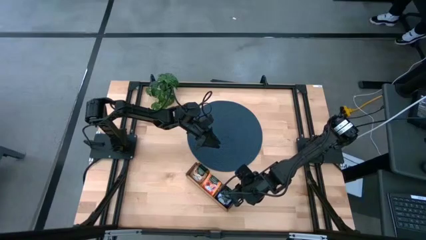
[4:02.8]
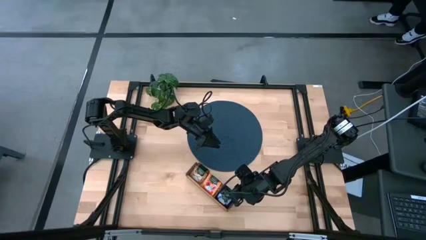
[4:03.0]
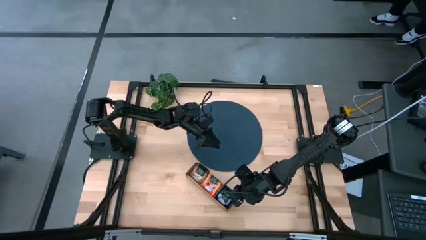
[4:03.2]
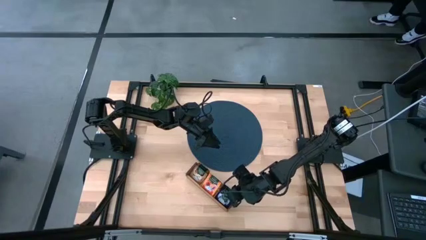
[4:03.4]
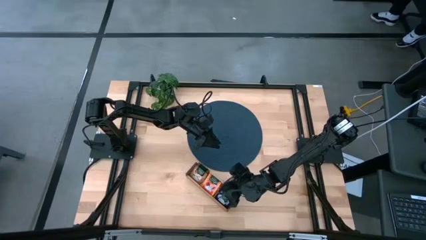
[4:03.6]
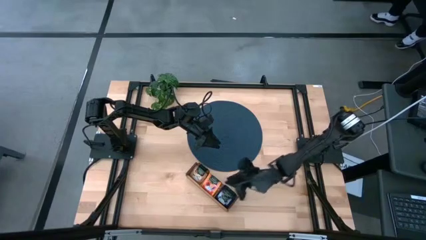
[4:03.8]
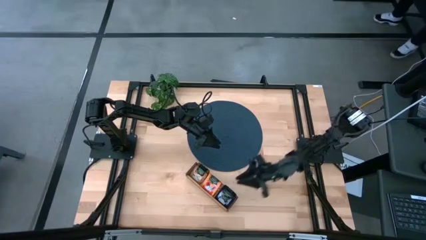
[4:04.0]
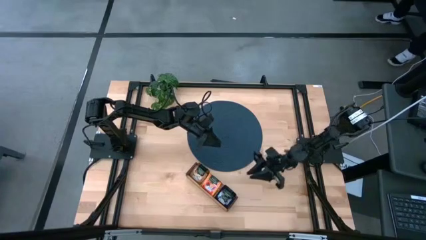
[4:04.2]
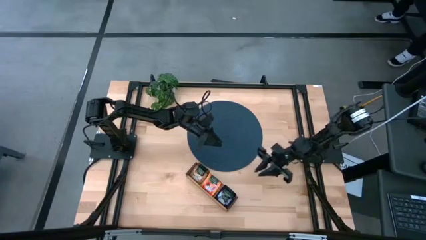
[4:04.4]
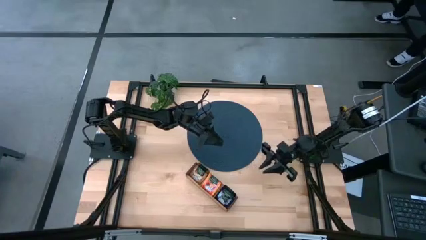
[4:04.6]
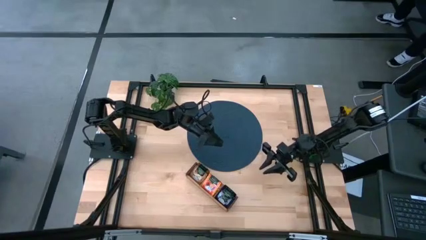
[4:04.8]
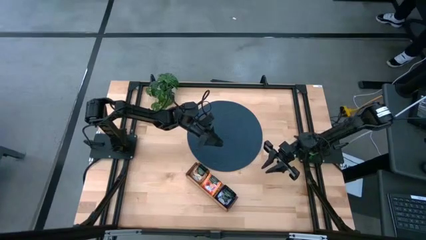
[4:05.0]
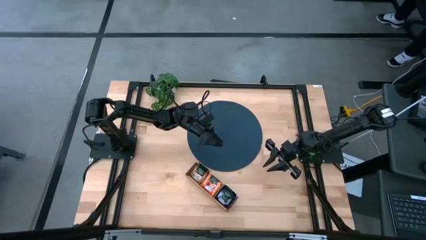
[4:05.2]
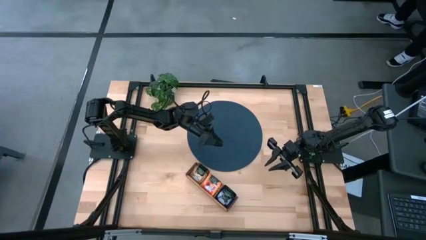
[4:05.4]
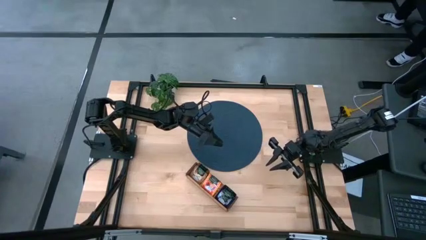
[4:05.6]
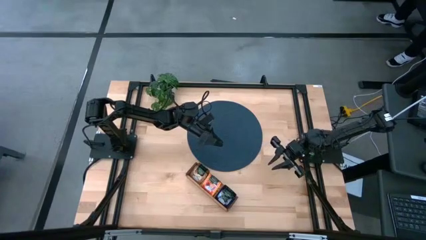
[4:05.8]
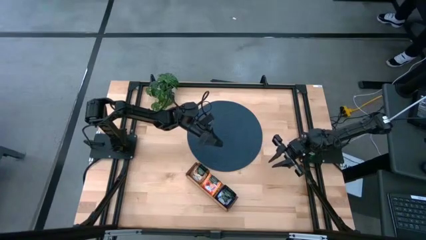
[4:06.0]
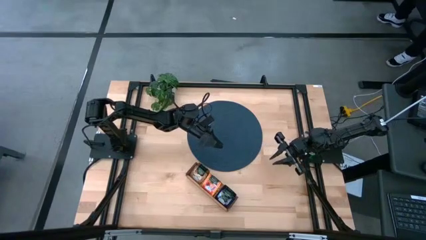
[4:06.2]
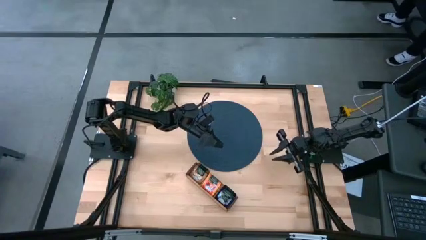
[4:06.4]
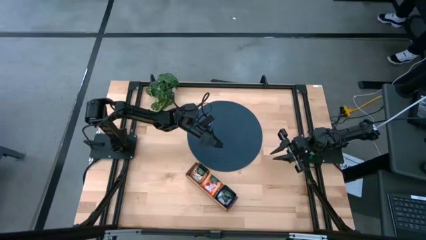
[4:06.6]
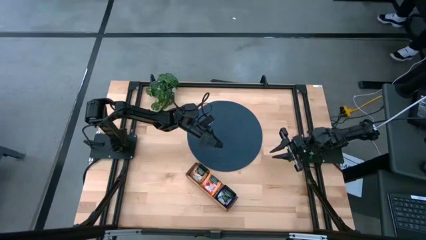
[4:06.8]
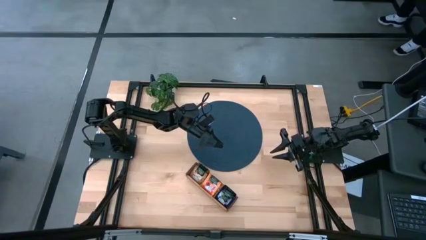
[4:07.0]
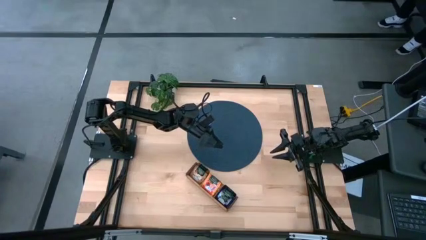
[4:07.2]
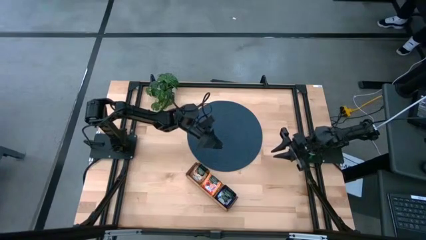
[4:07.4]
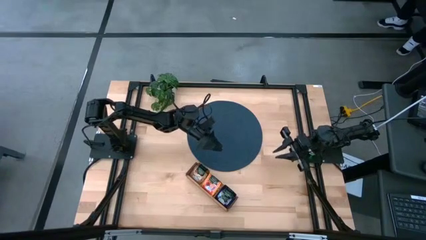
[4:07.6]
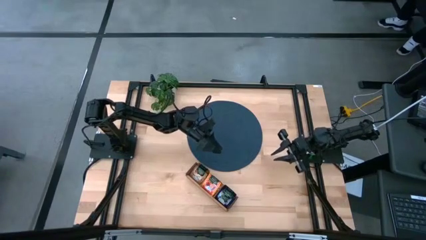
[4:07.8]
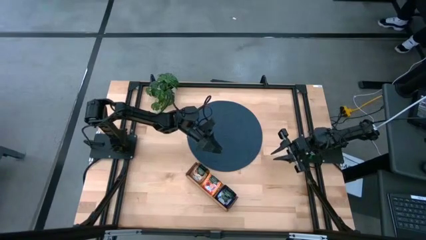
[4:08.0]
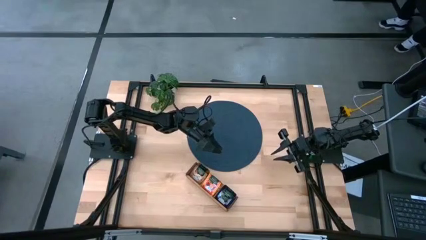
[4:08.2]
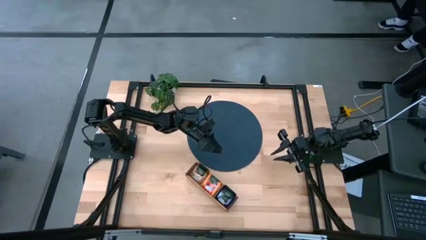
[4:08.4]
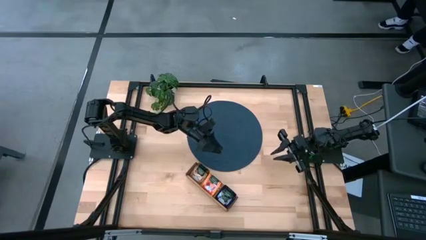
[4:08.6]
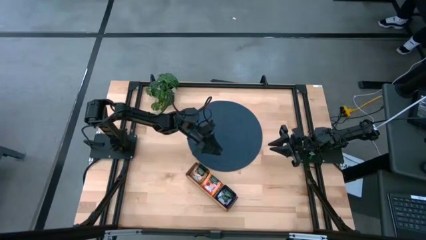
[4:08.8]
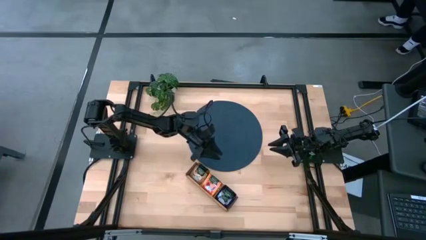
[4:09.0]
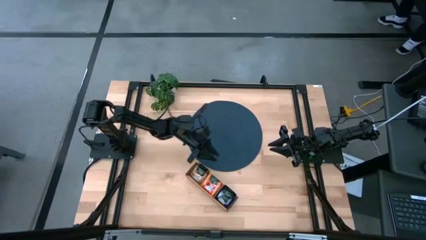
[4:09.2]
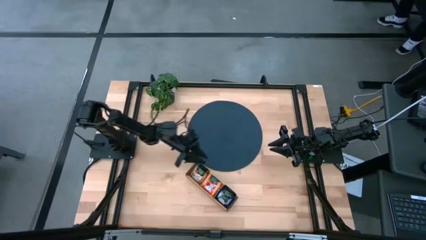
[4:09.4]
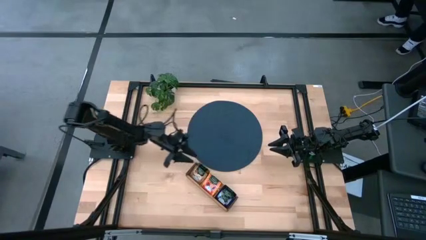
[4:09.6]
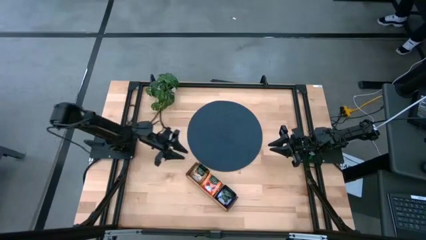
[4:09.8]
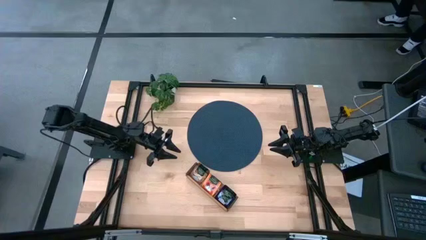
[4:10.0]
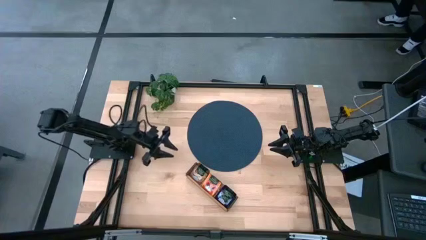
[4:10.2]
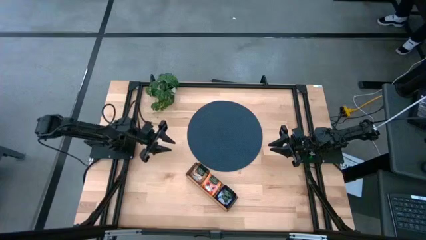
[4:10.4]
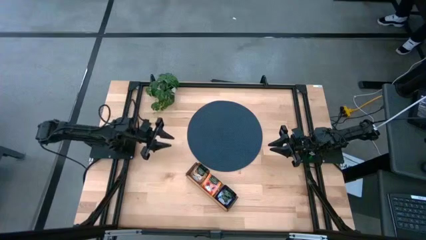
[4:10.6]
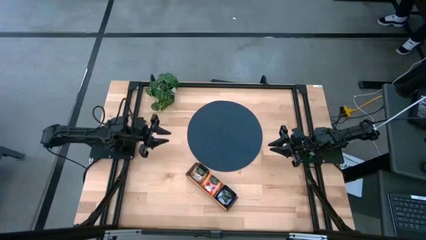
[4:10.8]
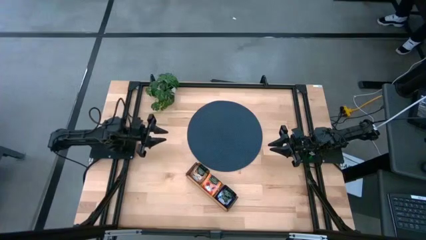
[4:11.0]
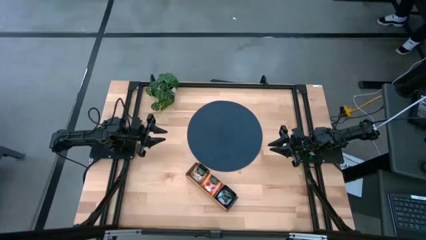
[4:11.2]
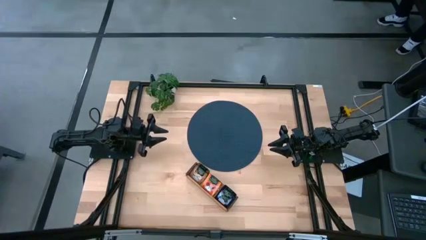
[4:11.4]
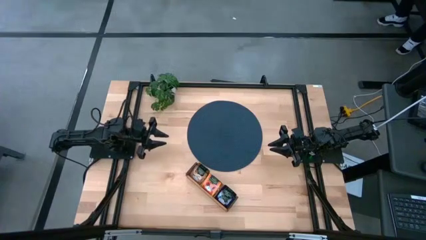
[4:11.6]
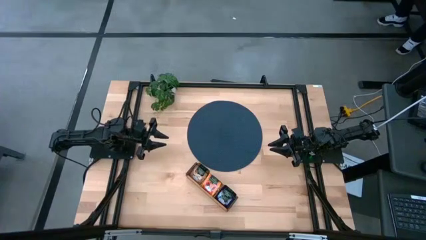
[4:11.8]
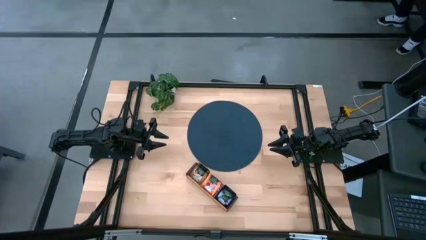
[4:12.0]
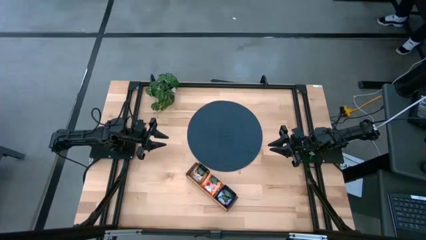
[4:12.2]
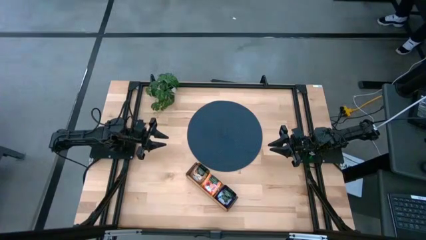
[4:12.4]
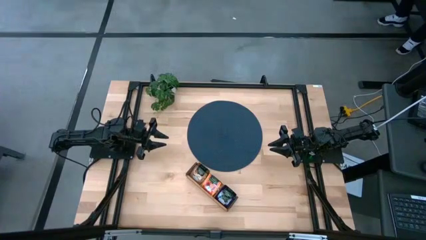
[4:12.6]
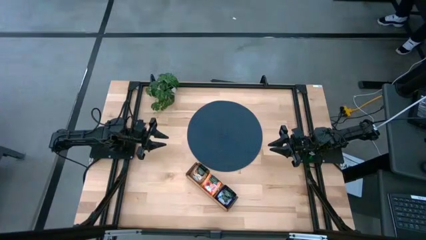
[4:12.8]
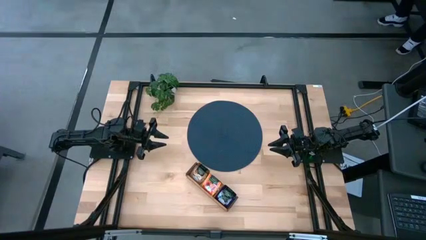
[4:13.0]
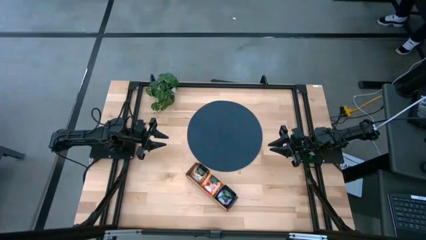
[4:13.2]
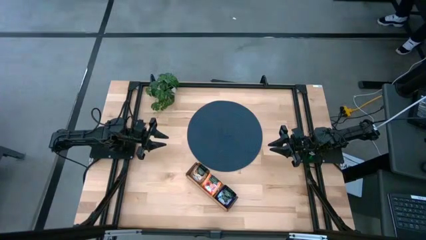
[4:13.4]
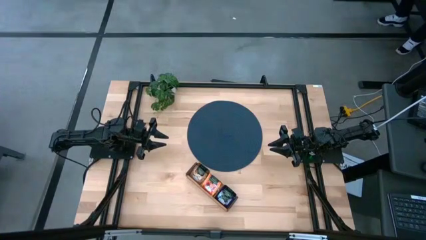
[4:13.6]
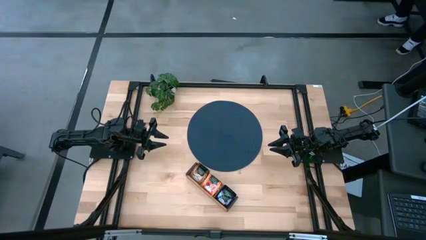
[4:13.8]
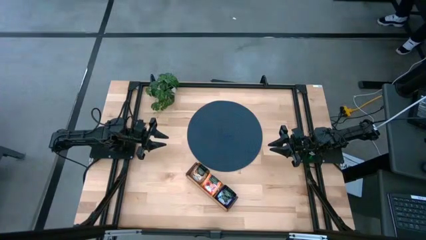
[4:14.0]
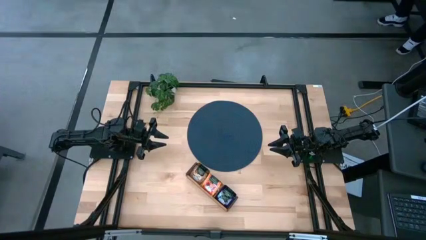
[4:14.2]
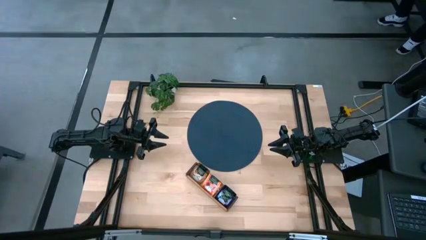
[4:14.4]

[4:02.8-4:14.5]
Task: Pick & Place Tea
Return to Home Position

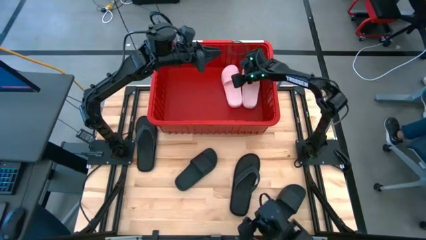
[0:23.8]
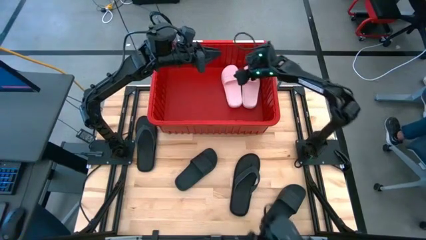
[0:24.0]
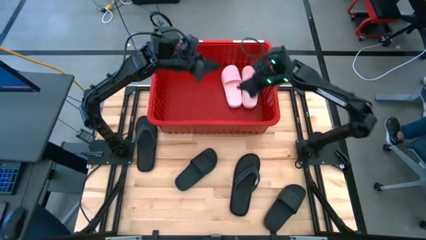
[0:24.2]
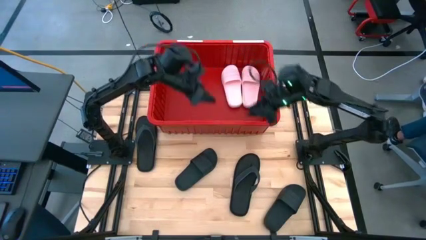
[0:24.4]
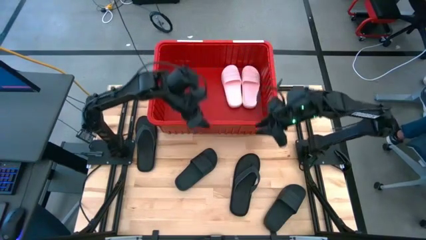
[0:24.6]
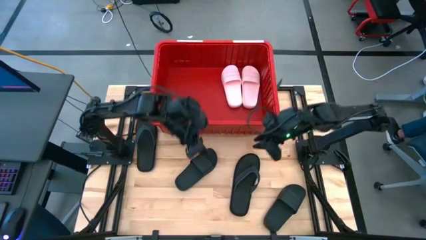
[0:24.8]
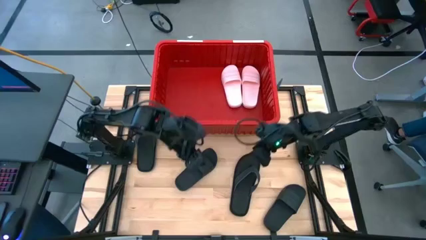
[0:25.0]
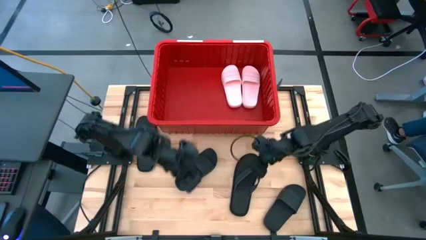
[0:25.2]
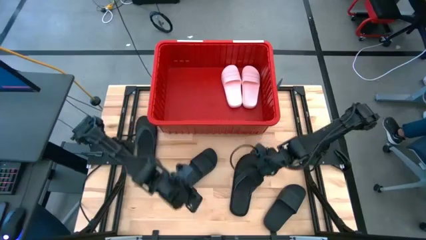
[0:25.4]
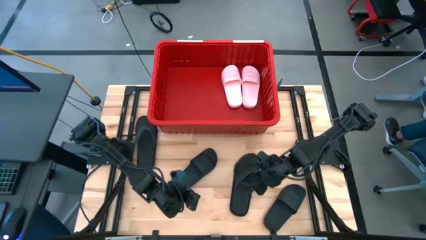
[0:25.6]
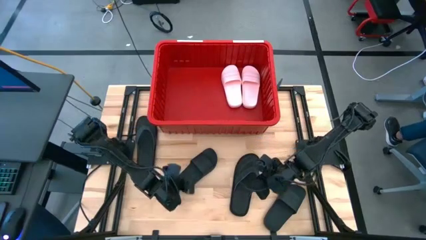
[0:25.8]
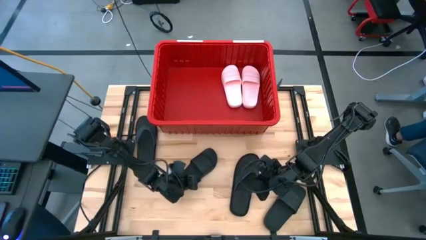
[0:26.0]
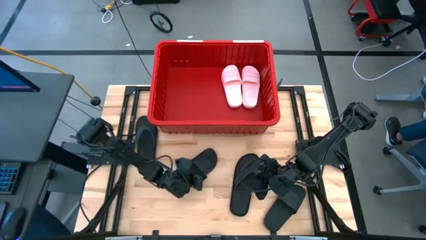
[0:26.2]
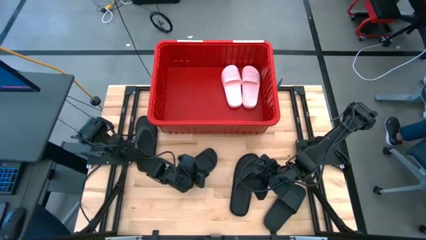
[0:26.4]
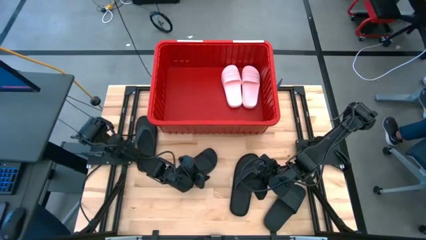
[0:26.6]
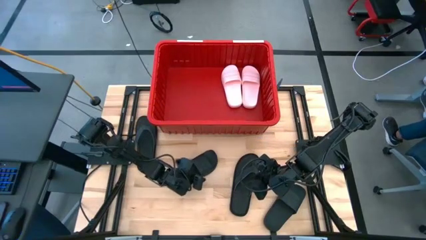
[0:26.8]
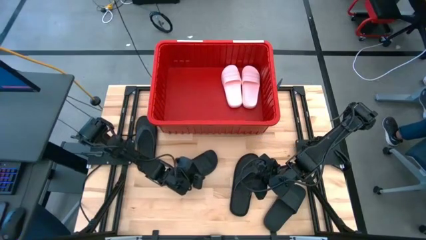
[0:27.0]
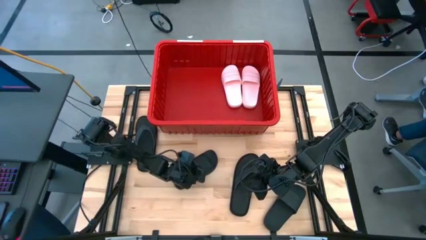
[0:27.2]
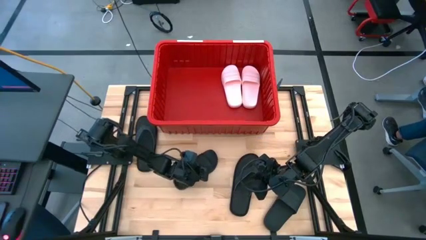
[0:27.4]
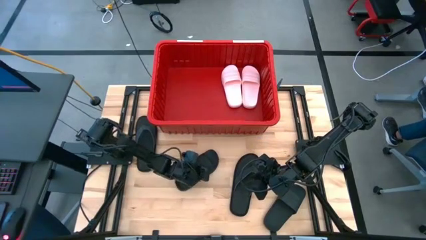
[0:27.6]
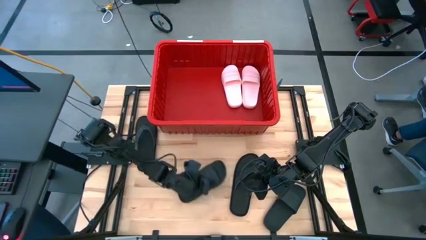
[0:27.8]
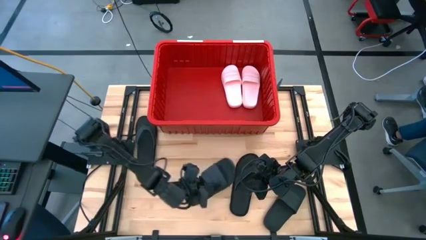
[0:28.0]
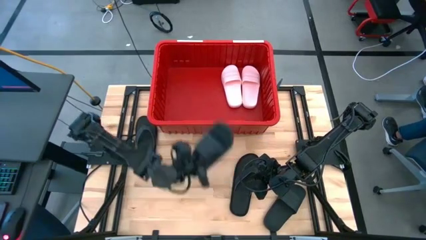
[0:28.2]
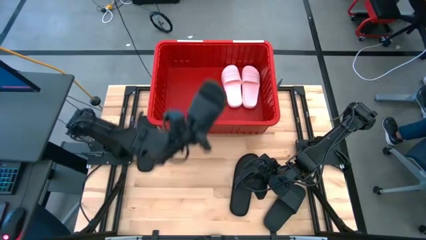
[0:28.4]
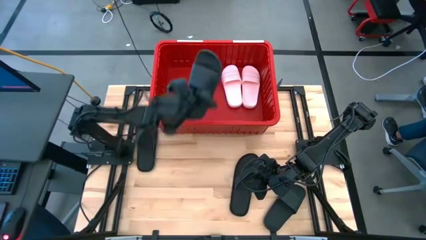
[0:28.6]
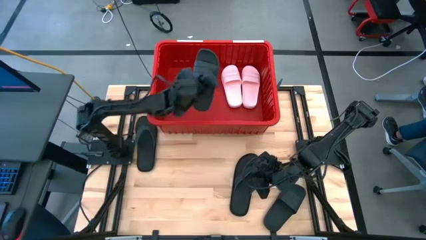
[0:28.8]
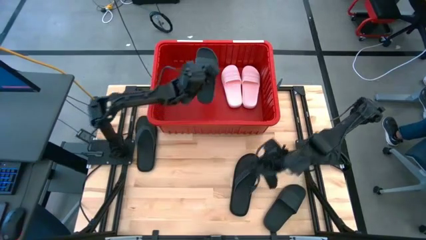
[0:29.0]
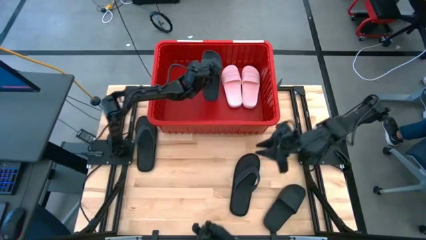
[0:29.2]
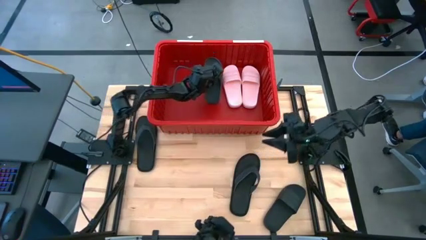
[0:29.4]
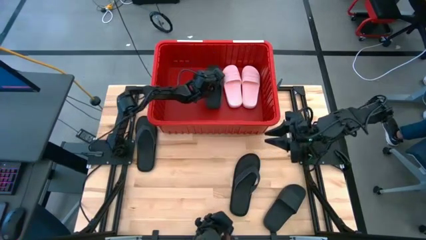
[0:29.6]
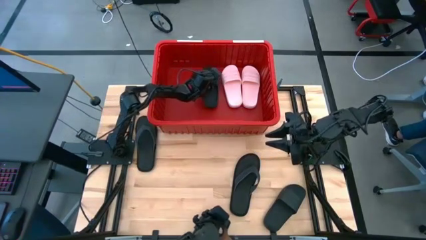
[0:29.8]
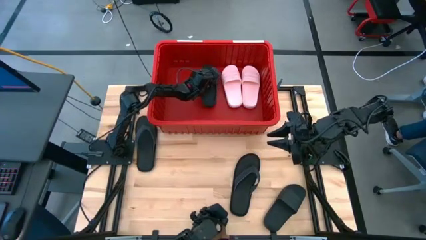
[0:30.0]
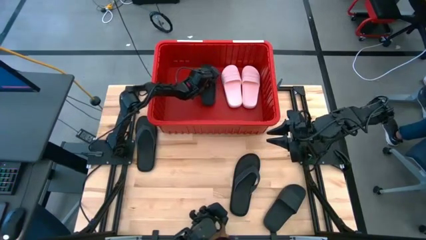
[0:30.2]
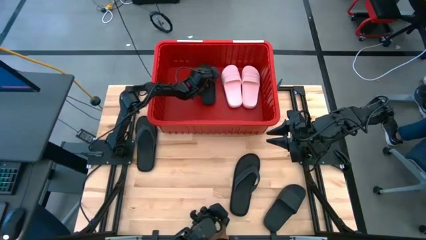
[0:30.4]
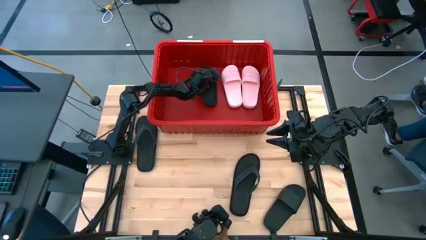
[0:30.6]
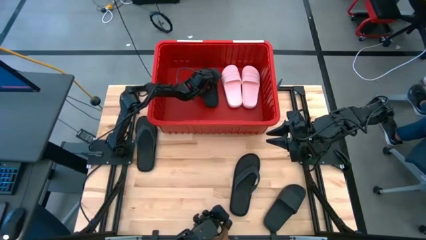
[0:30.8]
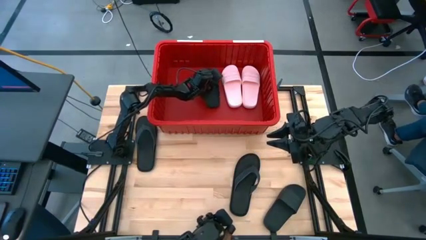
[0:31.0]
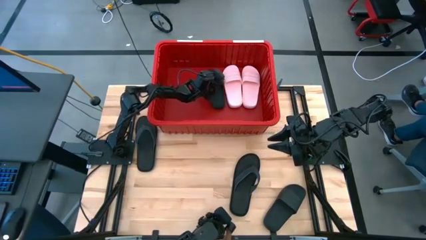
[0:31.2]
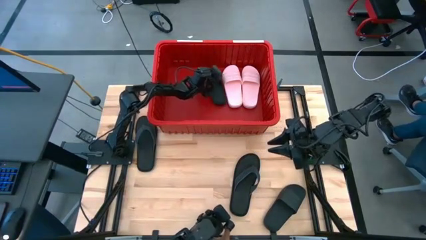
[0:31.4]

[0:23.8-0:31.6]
Task: Pick and place slides into bin
Put the top black slide into the red bin
